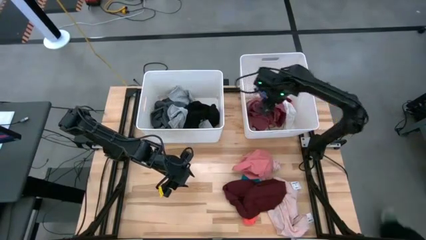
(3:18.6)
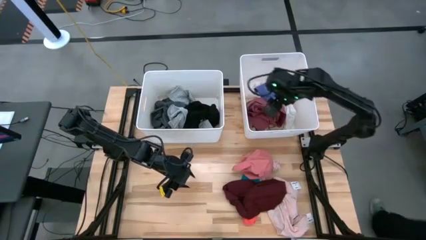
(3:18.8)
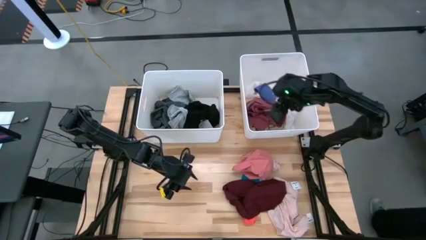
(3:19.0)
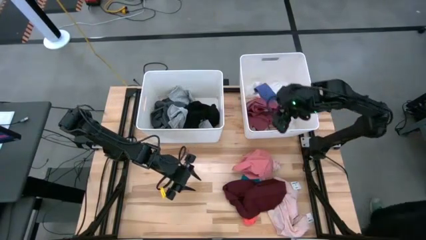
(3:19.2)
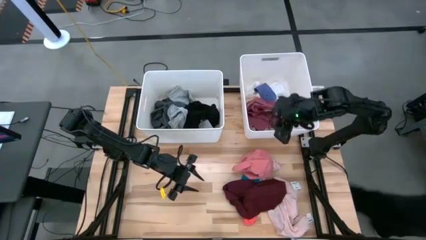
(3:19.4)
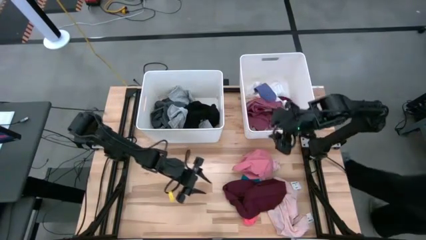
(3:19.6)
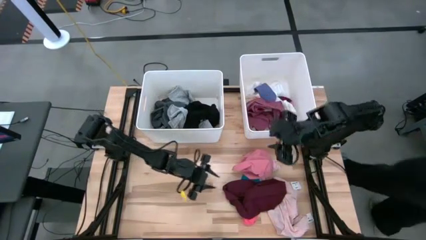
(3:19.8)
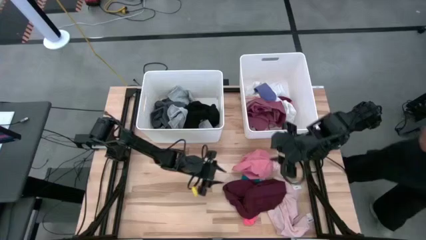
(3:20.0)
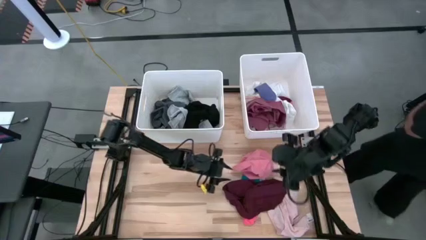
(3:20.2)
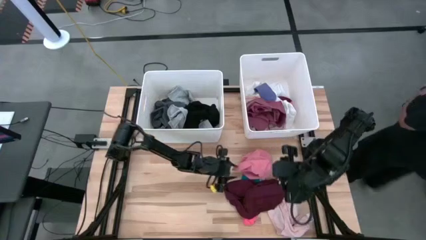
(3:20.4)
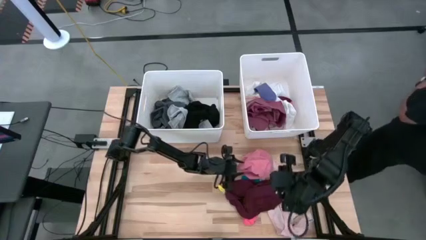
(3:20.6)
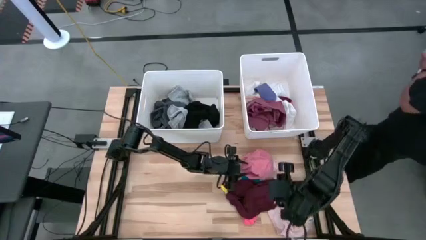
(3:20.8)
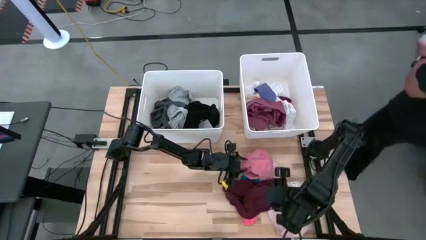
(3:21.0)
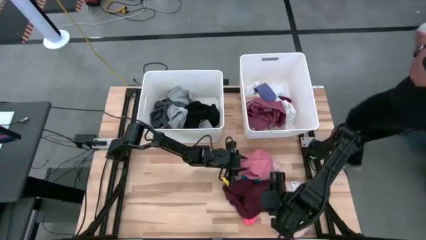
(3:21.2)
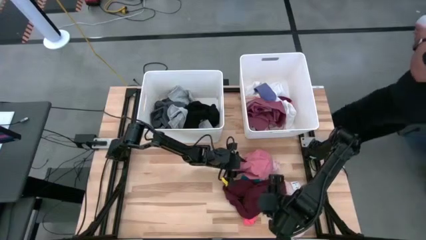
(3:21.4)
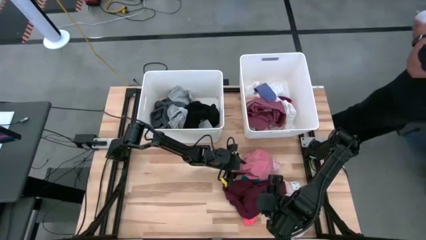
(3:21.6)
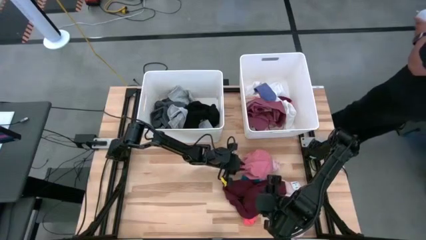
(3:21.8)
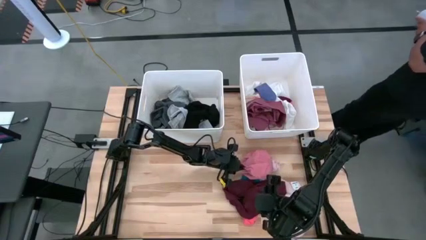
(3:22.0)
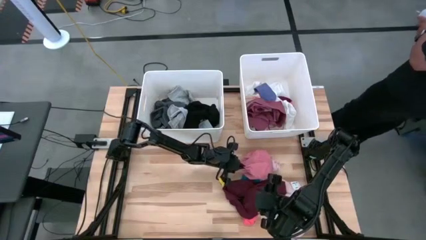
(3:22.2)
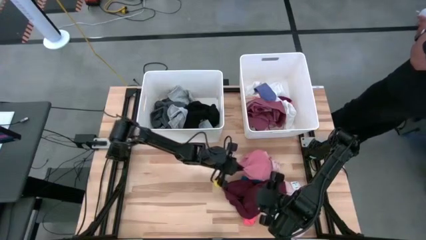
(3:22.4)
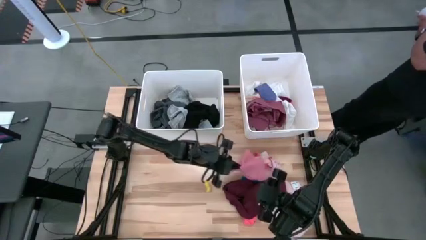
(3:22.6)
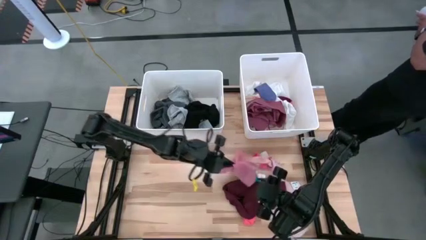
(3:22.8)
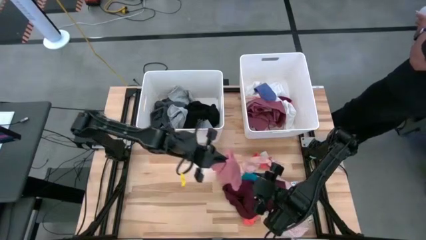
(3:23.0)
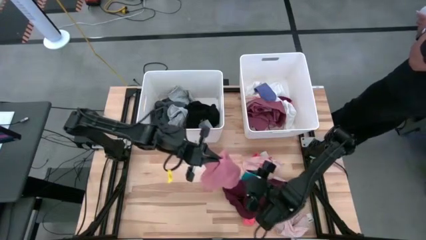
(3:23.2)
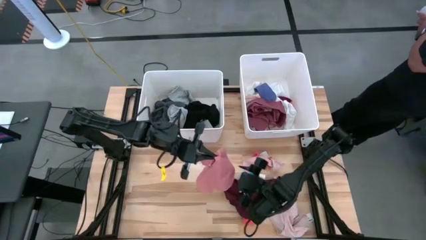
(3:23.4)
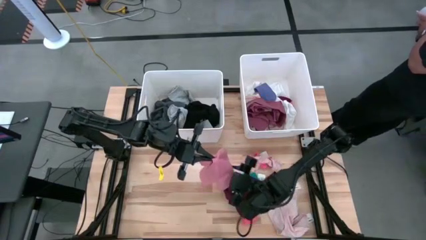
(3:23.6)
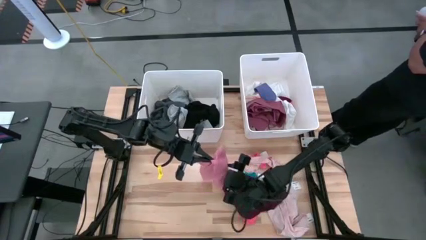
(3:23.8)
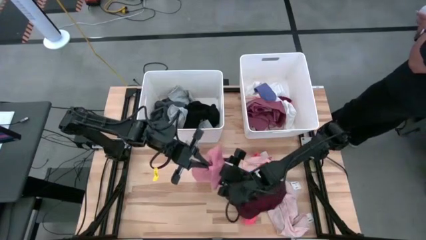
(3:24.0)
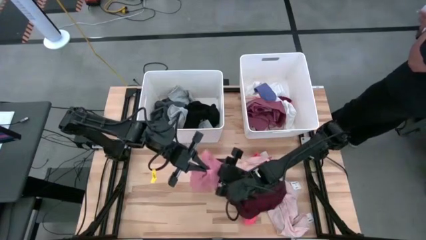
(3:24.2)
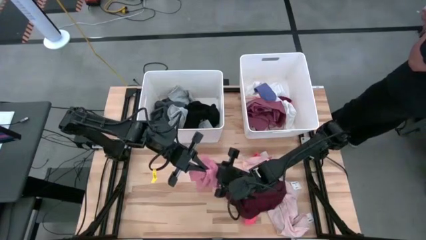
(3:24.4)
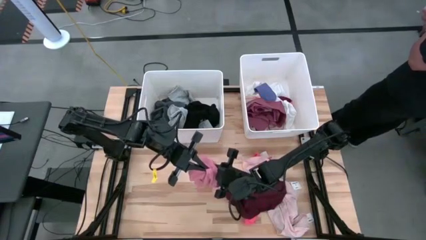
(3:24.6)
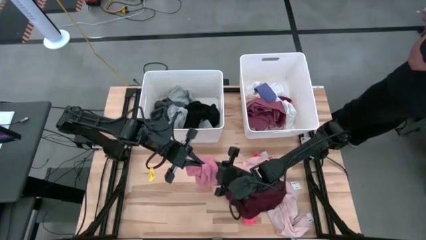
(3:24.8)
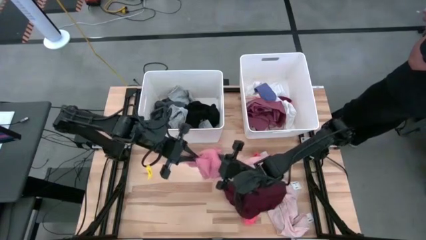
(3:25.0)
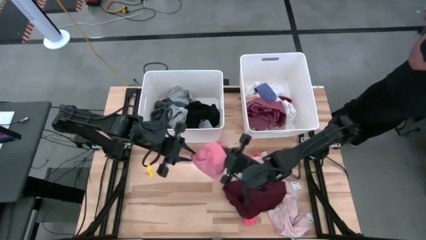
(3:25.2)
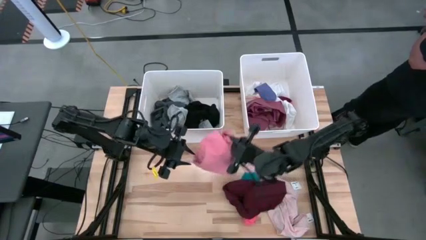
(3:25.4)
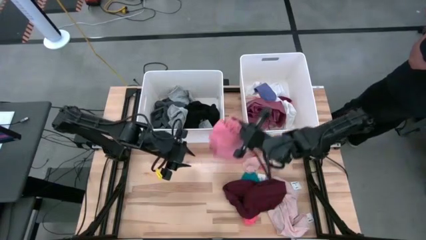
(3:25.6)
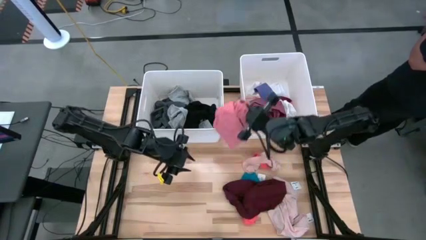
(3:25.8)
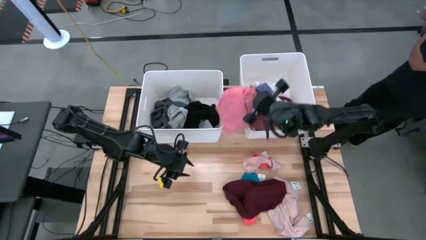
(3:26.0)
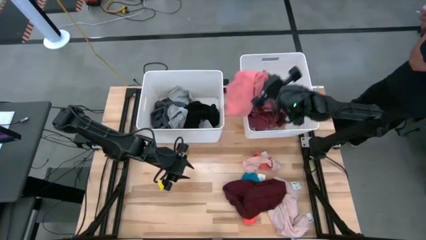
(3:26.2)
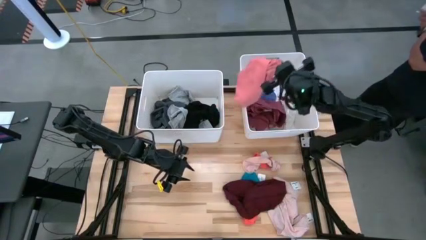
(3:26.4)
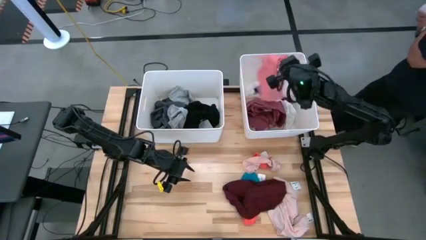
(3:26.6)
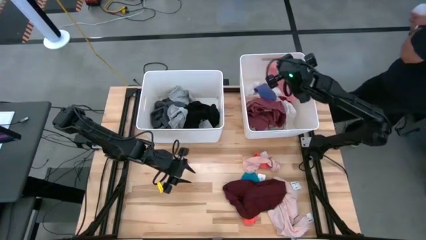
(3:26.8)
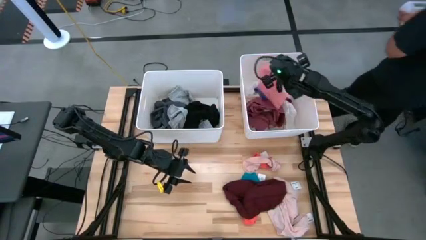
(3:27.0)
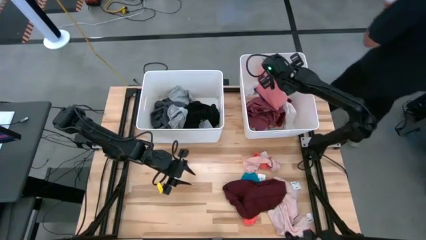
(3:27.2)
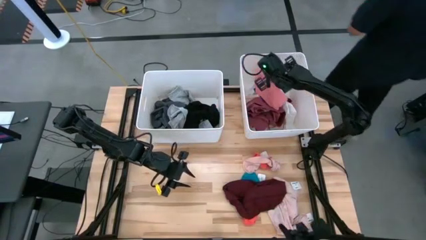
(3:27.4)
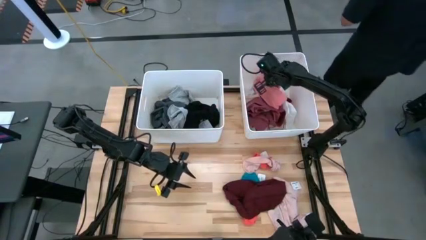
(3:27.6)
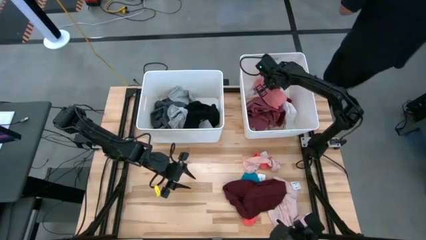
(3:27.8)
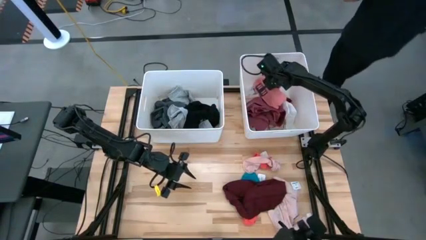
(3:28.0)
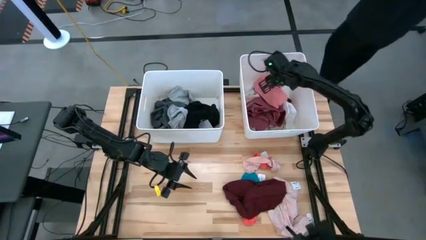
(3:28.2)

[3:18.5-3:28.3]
Task: Sort clothes
Put the pink underwear into the right white laundry organizer

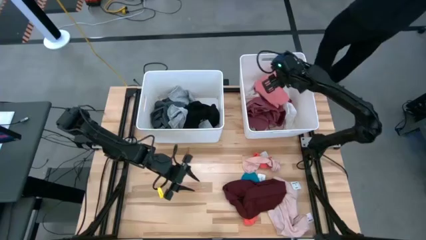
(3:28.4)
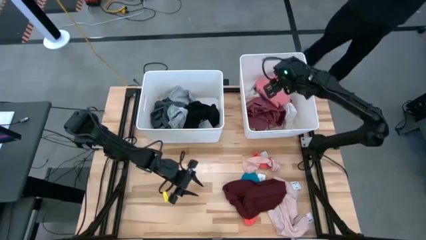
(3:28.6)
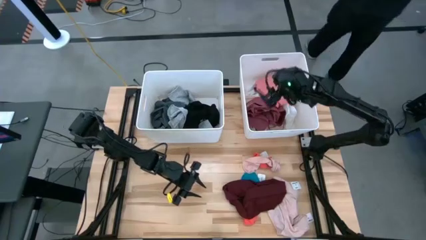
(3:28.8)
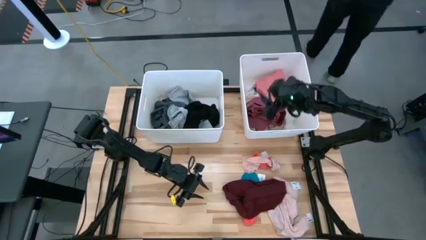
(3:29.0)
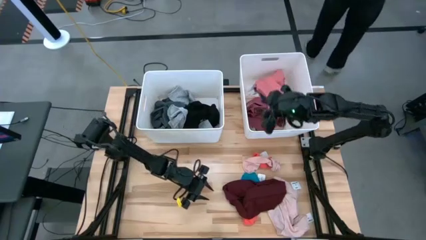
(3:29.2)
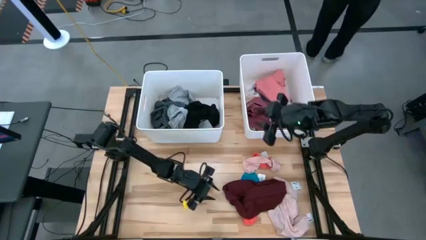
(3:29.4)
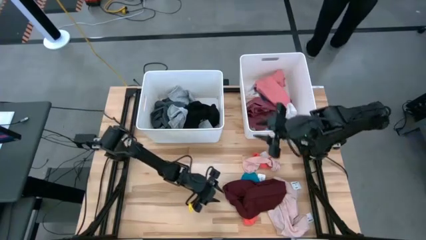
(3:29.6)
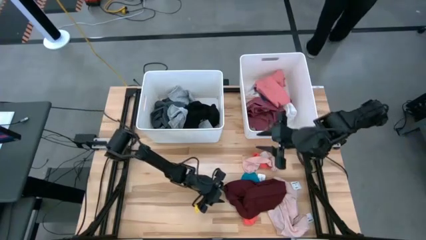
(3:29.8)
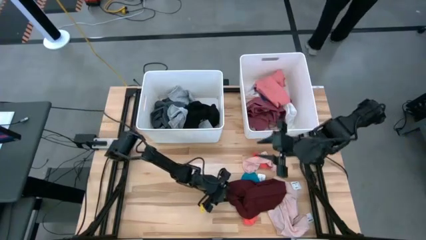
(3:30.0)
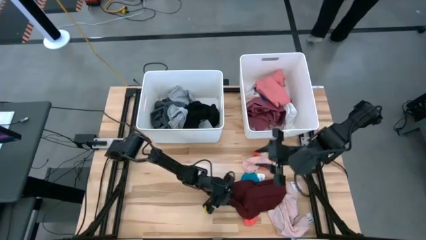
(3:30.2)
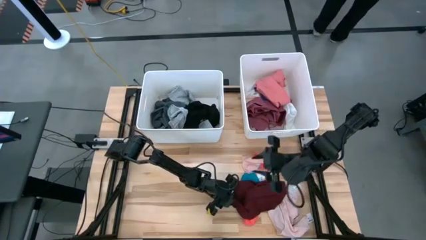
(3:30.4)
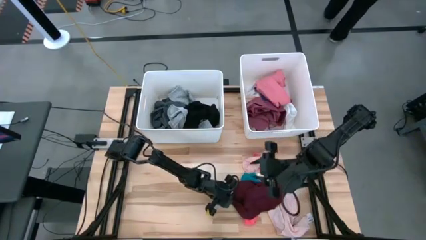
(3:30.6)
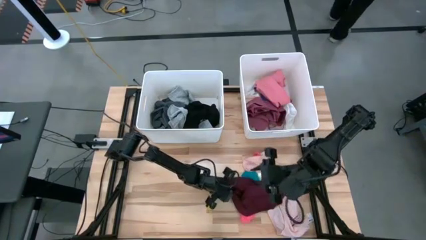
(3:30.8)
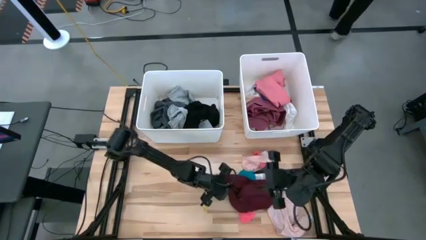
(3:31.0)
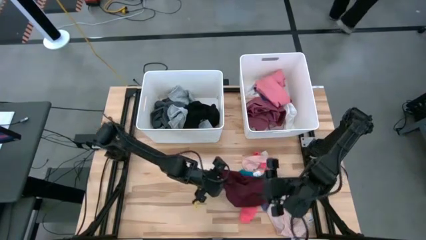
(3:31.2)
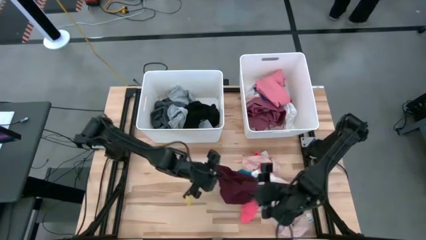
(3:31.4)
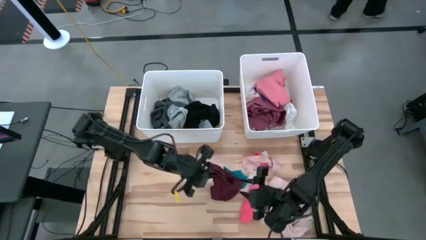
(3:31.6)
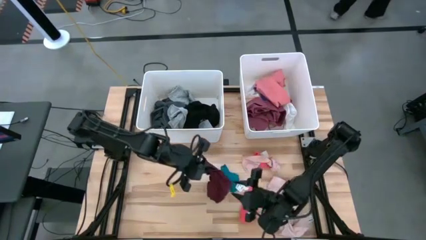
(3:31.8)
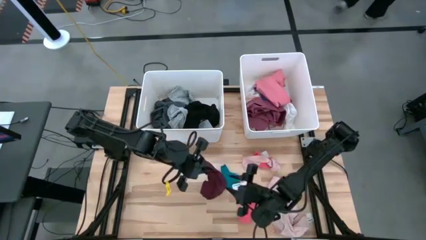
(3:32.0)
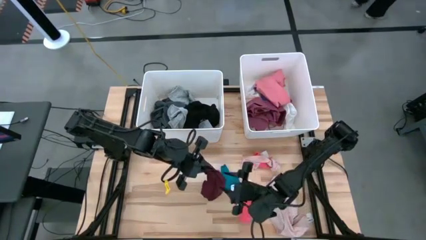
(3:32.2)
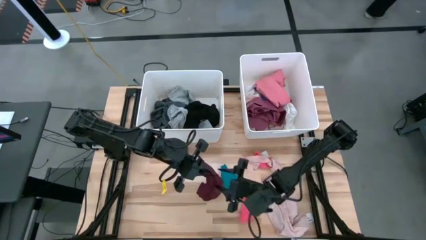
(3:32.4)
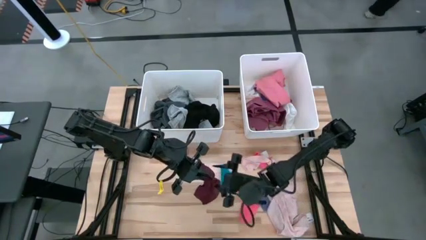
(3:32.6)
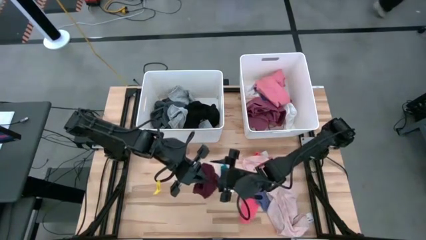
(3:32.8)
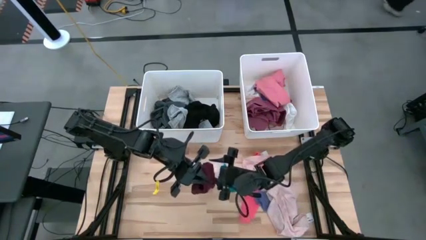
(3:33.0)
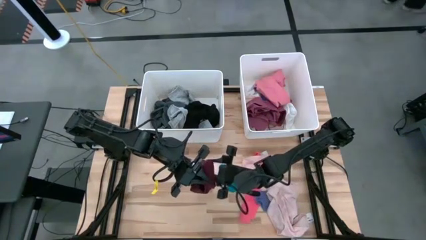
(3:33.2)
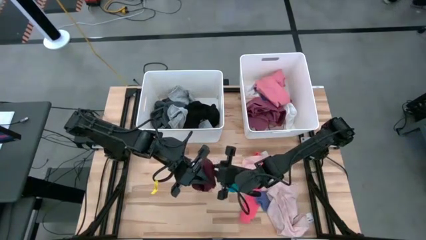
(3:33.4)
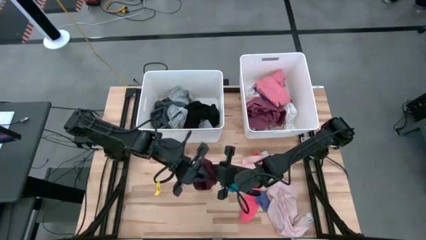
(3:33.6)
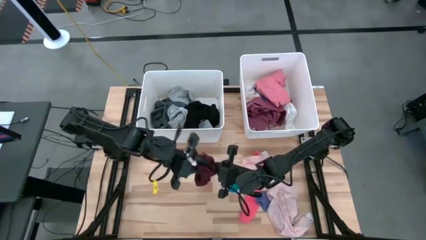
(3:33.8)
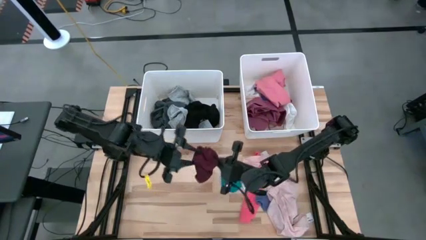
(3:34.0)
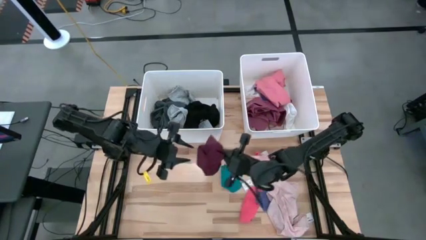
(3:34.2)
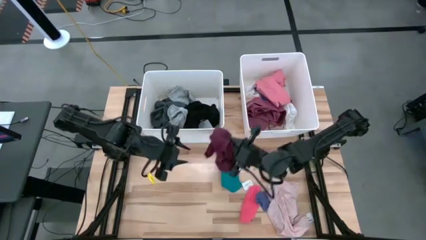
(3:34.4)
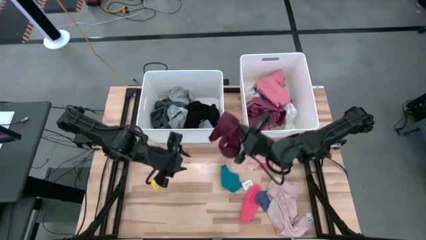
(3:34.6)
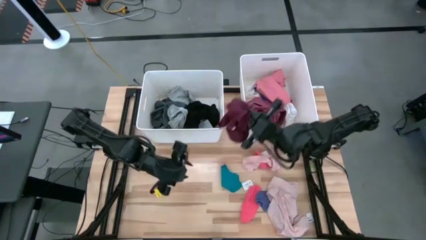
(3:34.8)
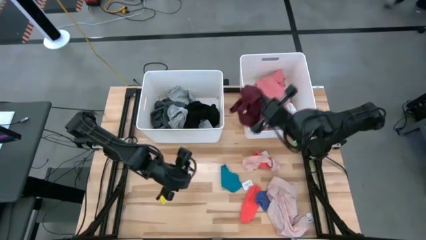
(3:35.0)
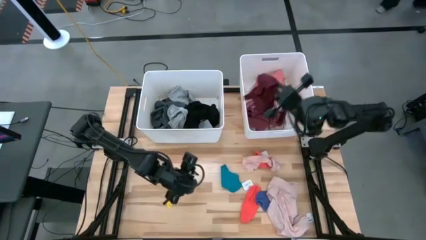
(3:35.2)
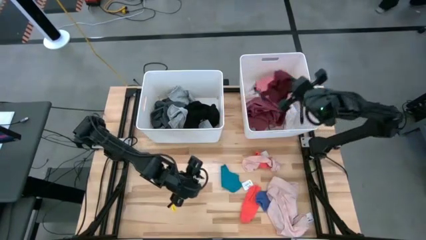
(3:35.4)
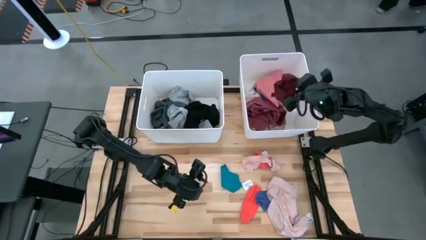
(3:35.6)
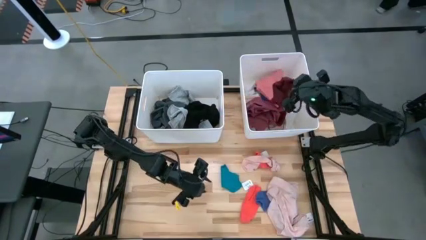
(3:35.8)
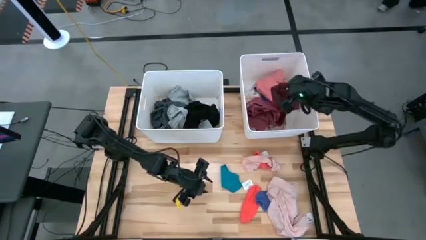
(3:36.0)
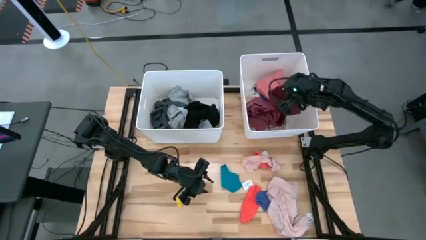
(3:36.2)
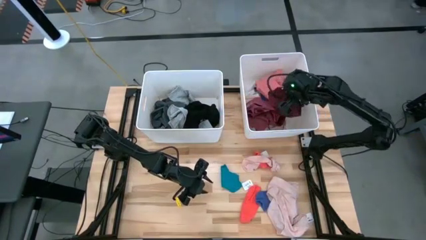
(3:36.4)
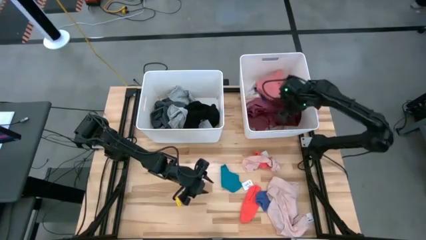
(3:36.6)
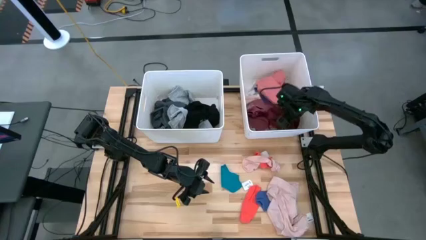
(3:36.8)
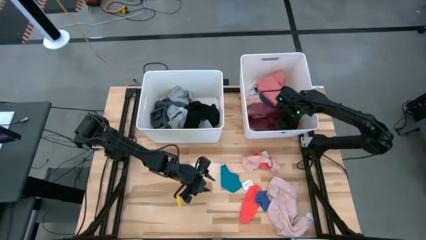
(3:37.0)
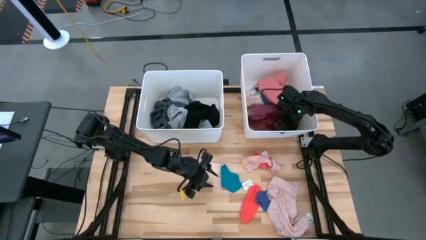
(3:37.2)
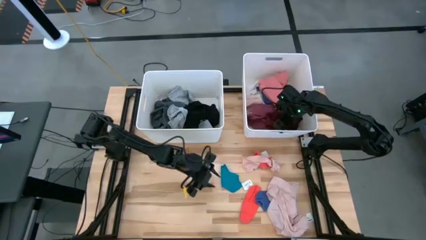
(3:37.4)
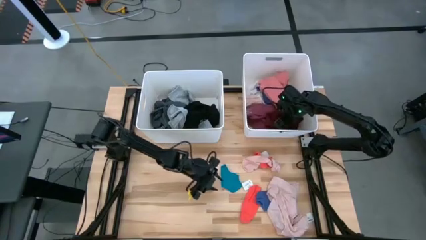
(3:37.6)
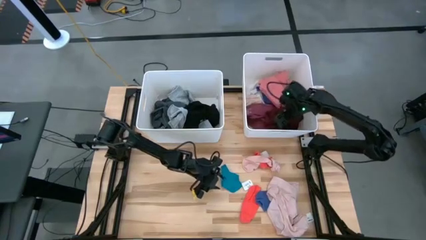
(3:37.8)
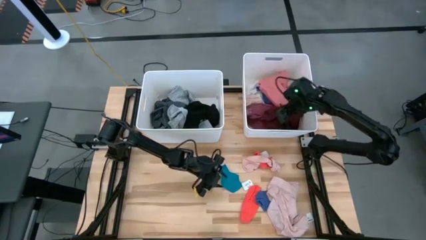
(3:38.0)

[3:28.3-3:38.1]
Put the dark red underwear into the right white laundry organizer
